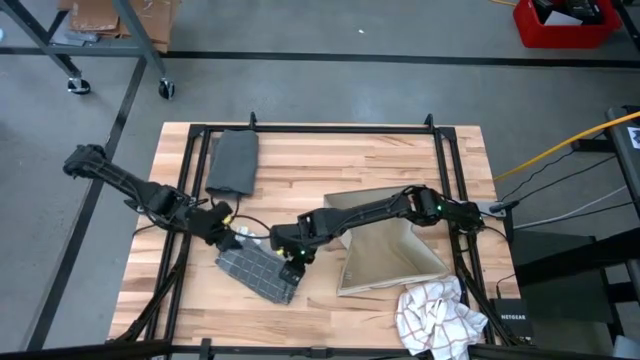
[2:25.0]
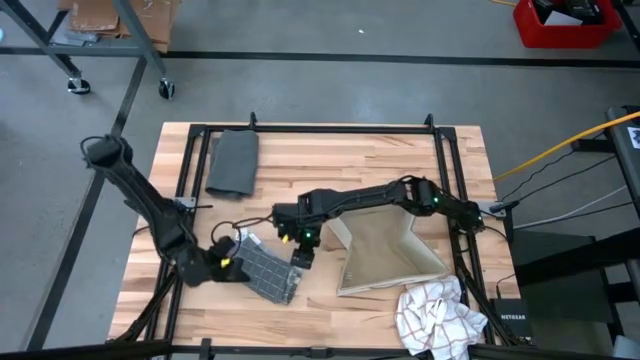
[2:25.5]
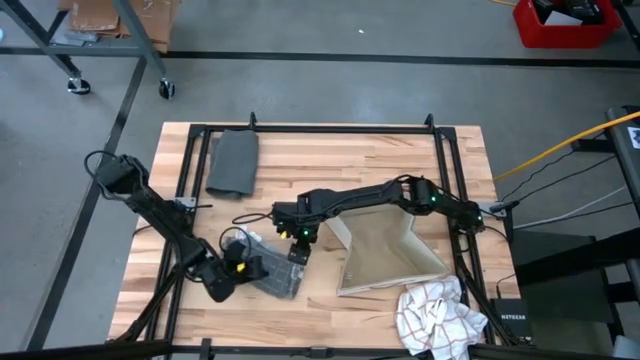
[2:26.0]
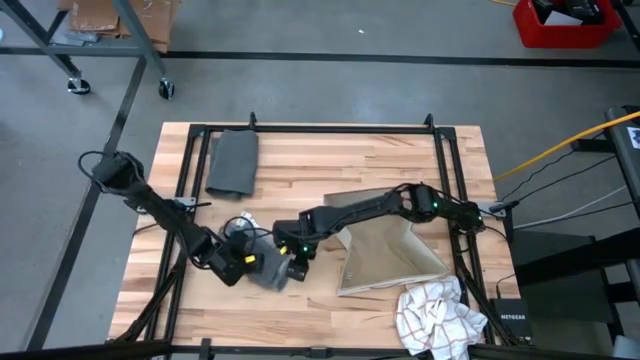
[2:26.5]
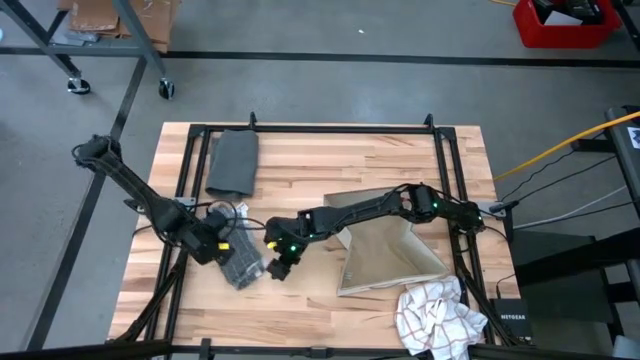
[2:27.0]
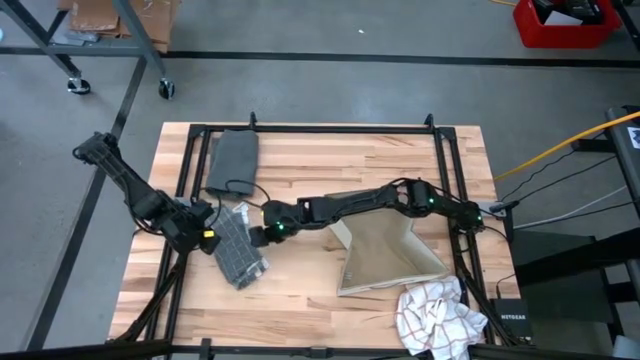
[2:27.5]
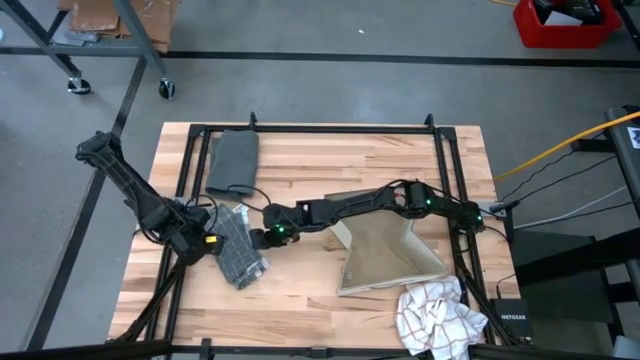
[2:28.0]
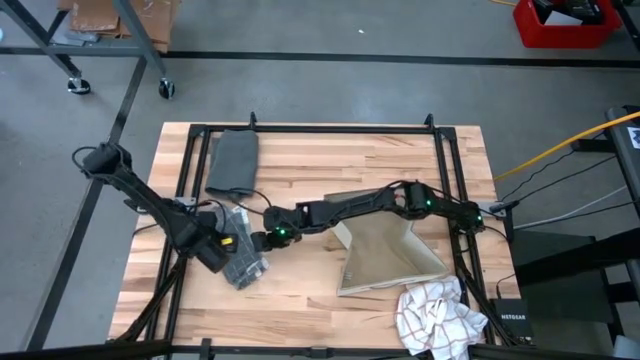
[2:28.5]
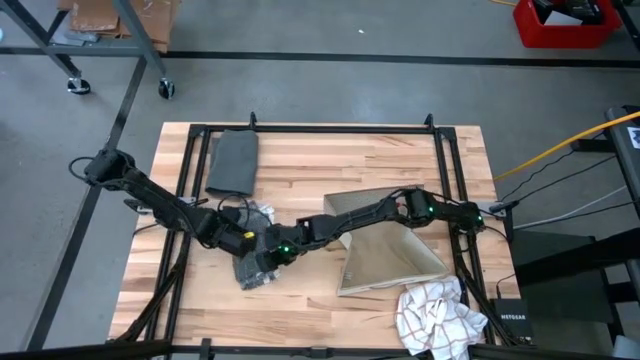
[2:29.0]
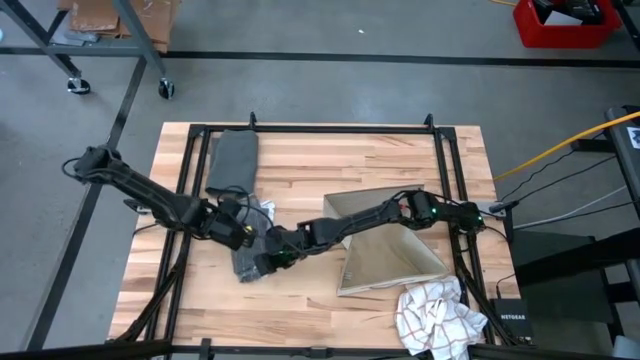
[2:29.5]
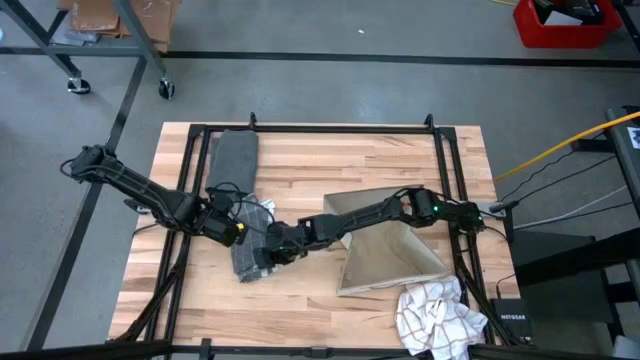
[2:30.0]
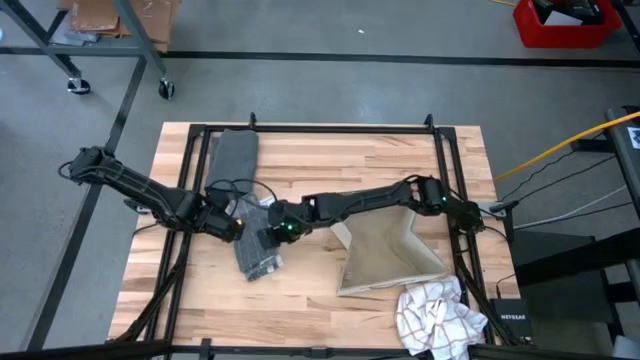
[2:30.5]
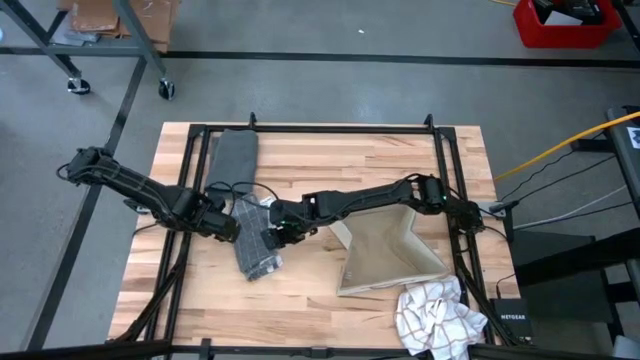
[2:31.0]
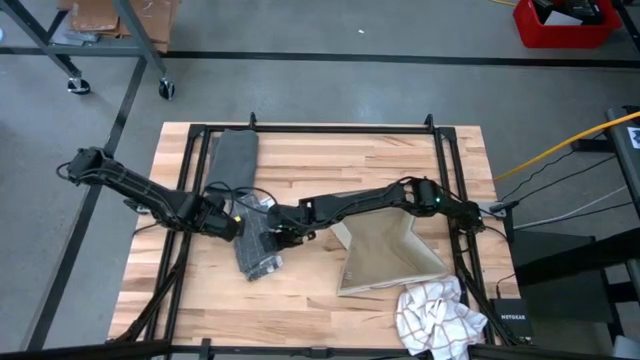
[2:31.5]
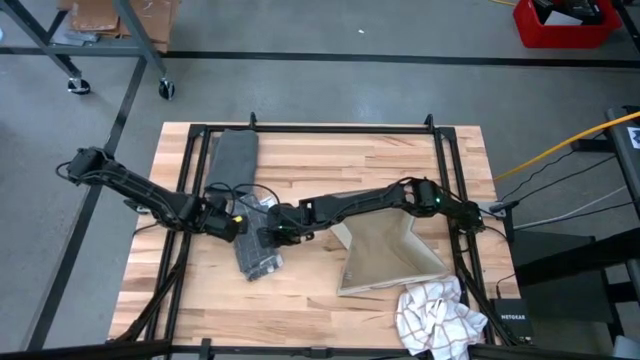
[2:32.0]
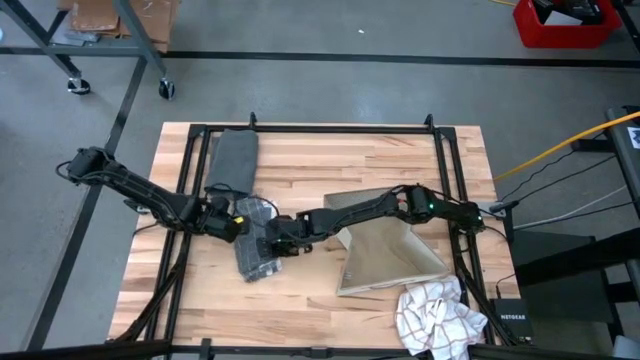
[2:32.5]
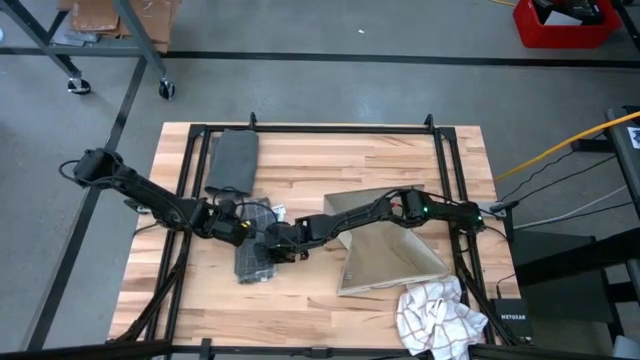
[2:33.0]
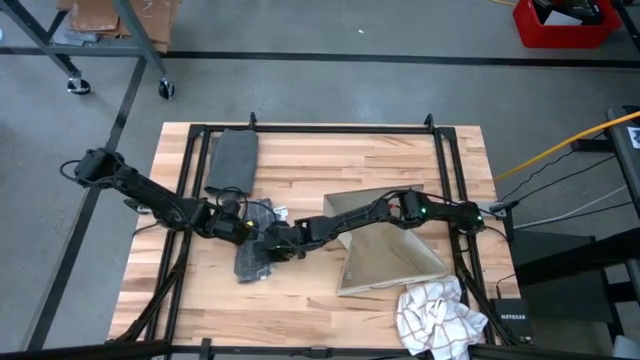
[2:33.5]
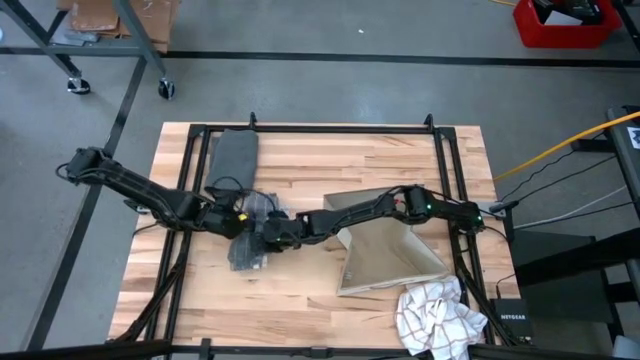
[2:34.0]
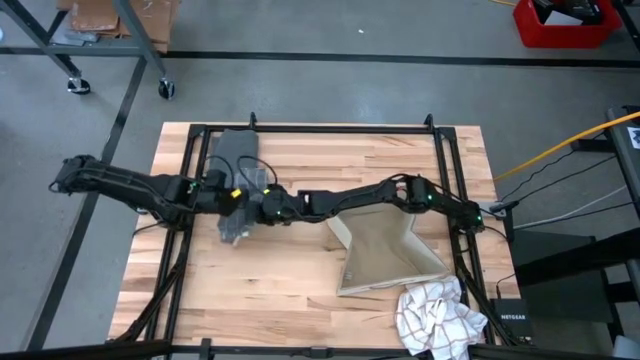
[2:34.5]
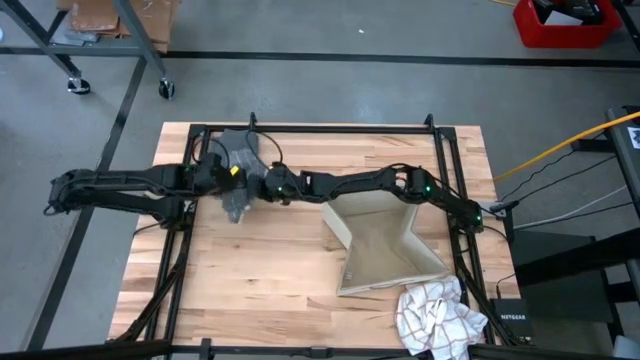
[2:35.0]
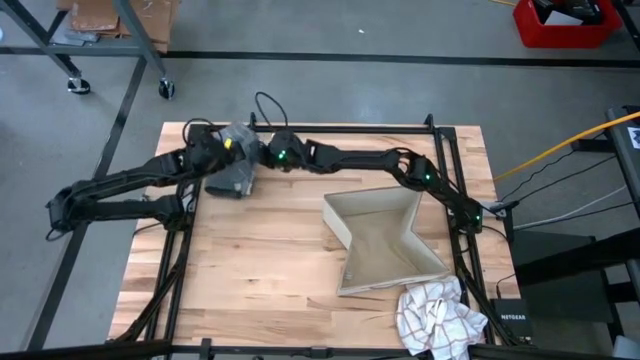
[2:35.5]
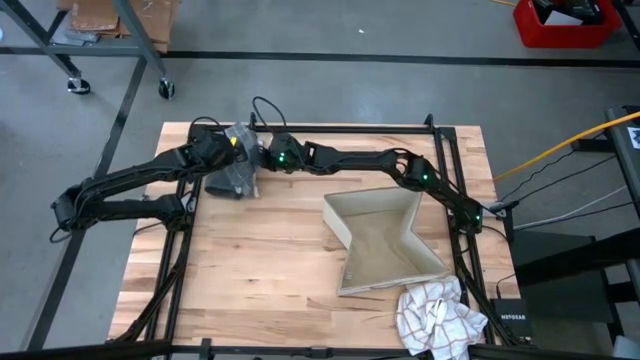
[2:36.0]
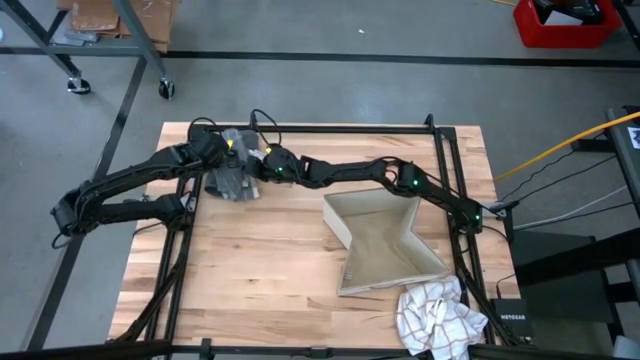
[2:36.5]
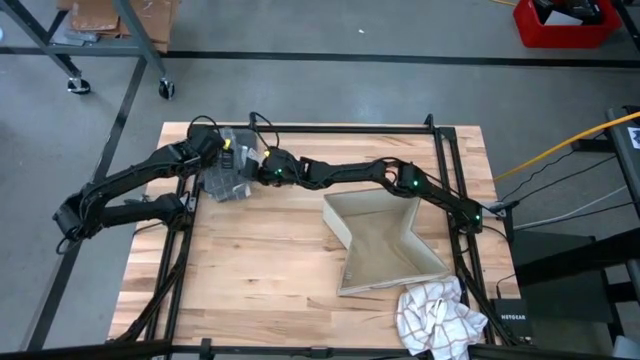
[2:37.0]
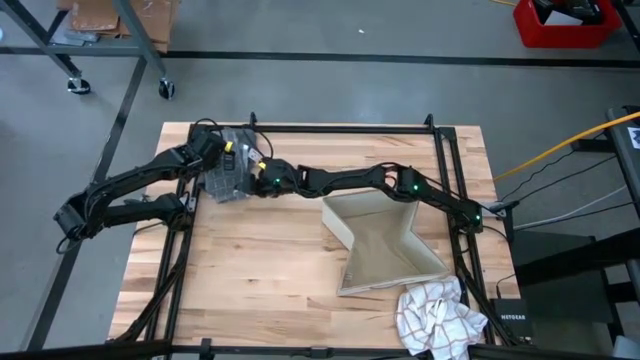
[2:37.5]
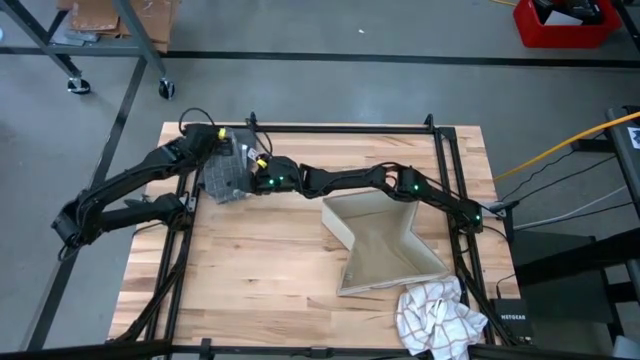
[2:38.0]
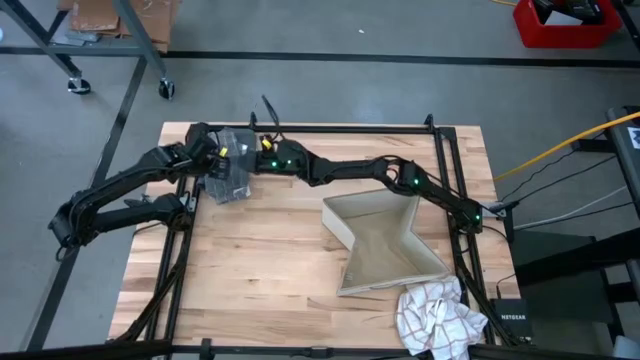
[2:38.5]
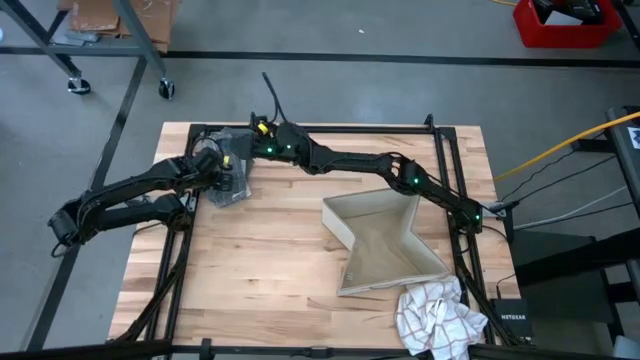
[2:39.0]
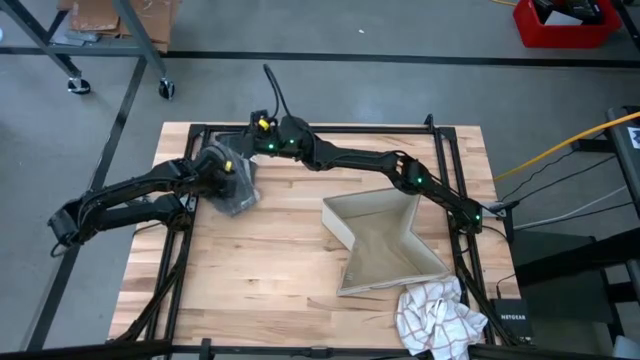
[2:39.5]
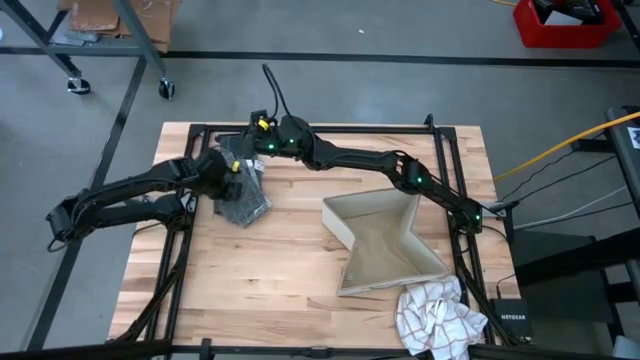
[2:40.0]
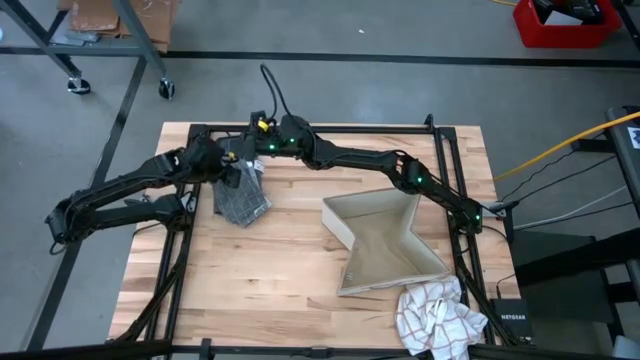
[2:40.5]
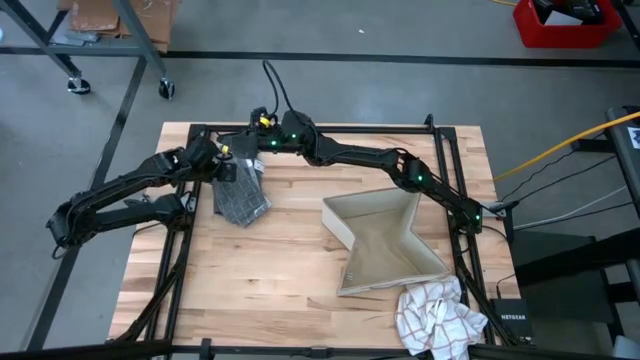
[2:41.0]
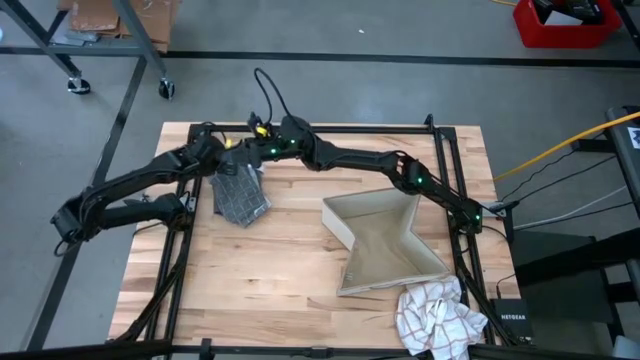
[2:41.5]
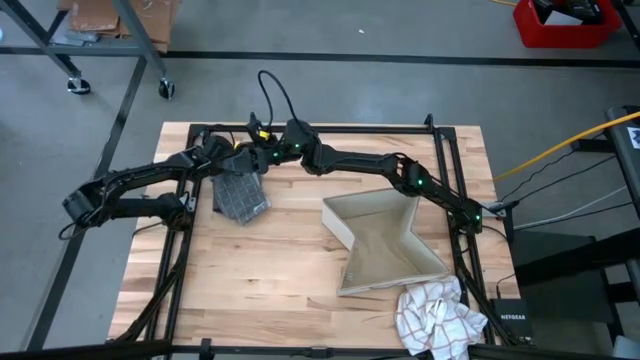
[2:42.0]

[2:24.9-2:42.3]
Task: Fold towel
Stack the gray patterned towel on top of the gray towel
